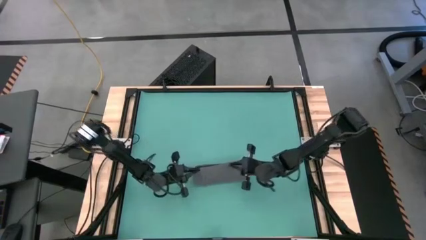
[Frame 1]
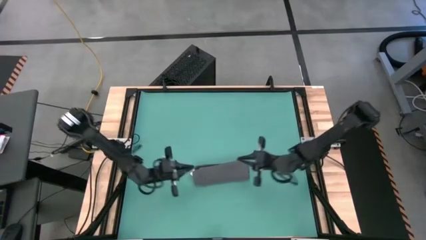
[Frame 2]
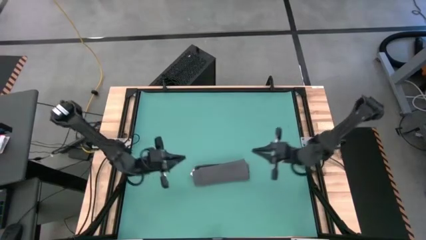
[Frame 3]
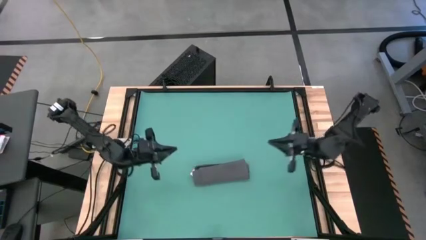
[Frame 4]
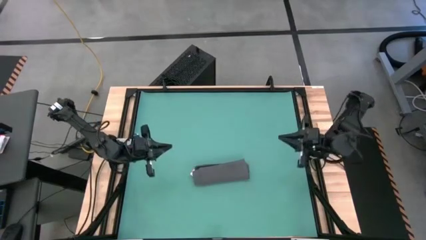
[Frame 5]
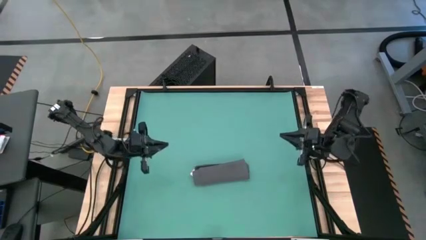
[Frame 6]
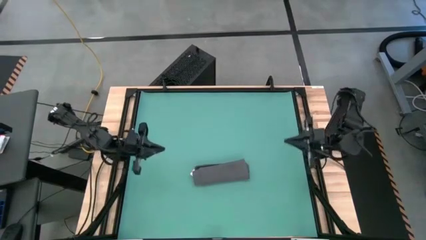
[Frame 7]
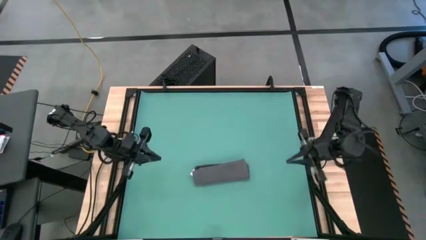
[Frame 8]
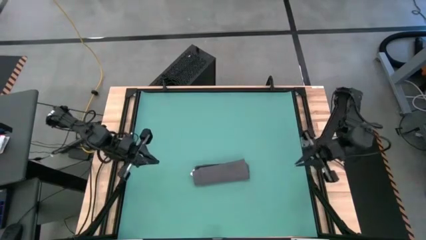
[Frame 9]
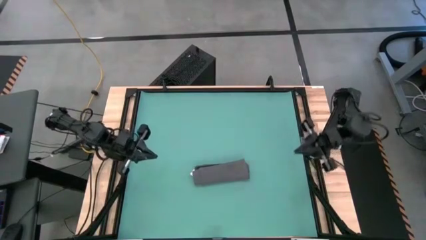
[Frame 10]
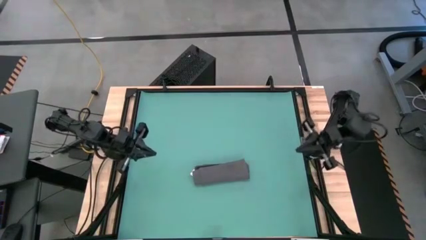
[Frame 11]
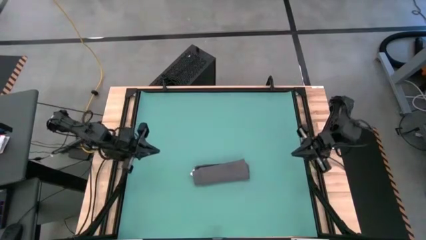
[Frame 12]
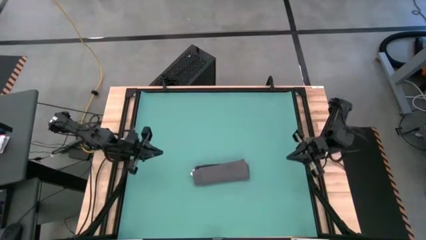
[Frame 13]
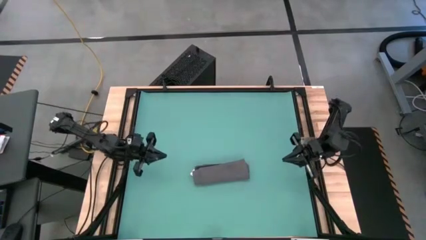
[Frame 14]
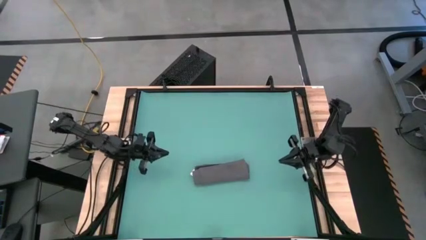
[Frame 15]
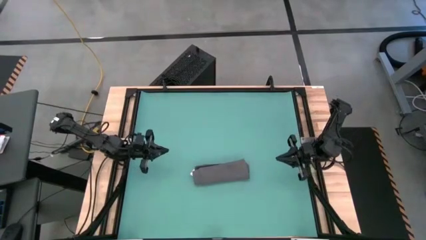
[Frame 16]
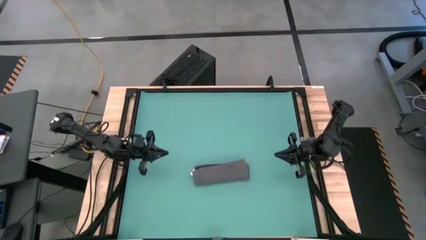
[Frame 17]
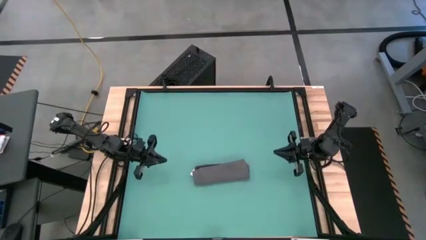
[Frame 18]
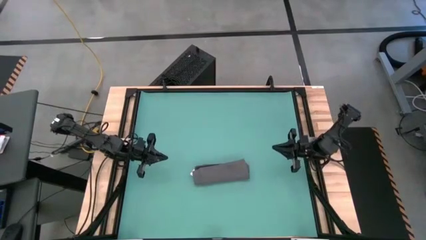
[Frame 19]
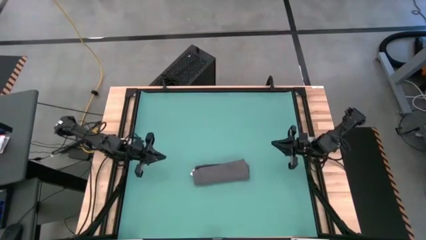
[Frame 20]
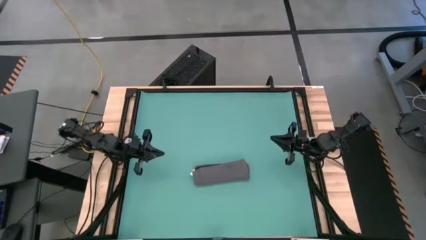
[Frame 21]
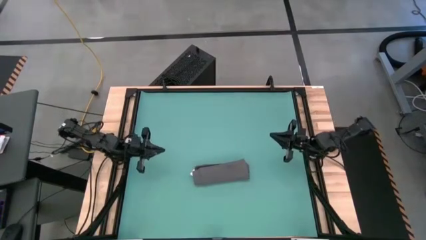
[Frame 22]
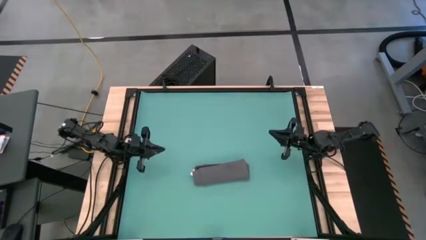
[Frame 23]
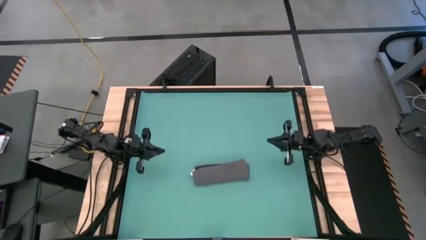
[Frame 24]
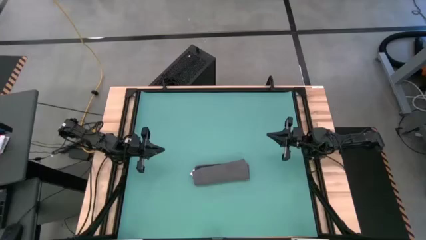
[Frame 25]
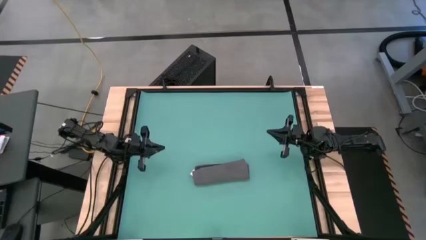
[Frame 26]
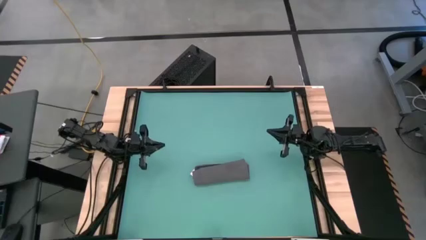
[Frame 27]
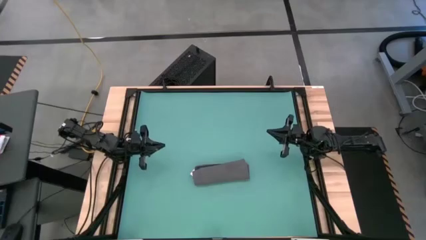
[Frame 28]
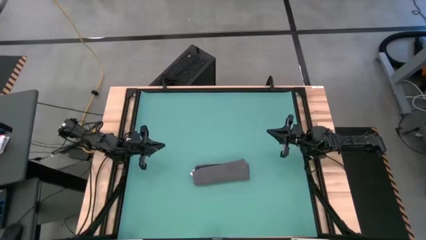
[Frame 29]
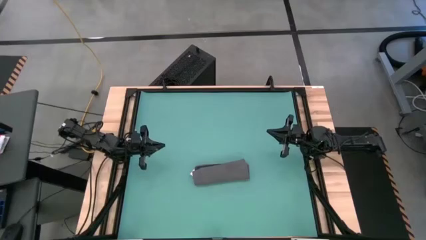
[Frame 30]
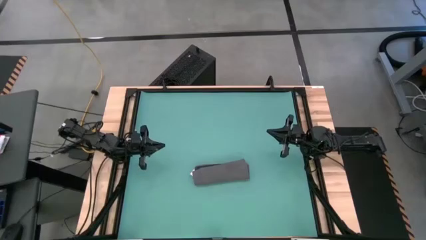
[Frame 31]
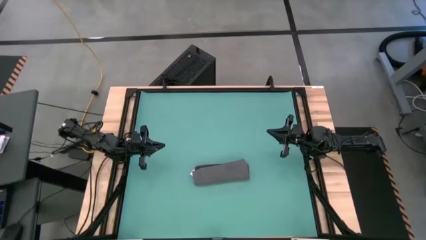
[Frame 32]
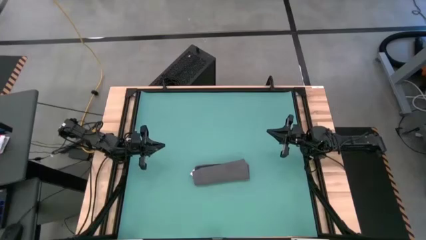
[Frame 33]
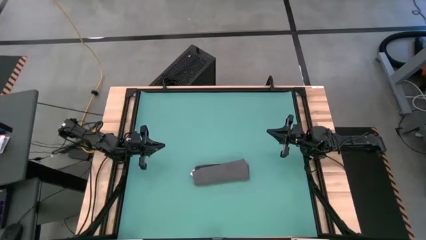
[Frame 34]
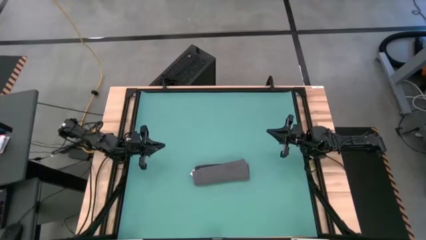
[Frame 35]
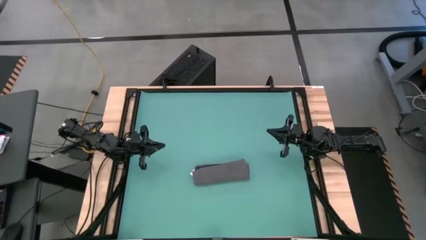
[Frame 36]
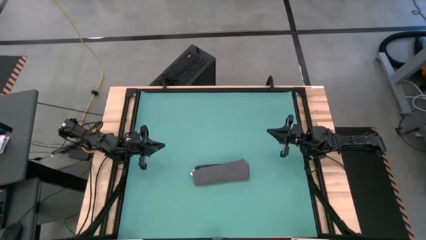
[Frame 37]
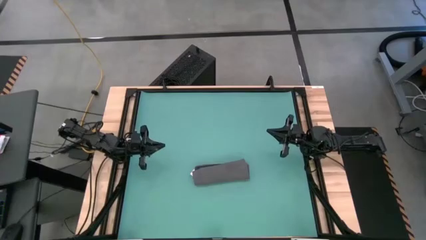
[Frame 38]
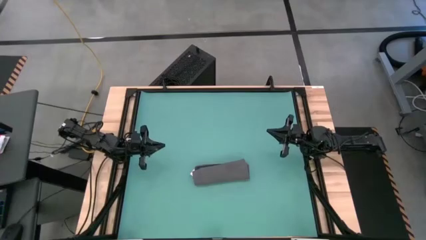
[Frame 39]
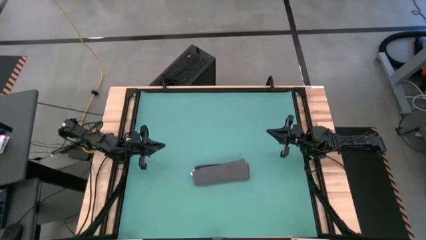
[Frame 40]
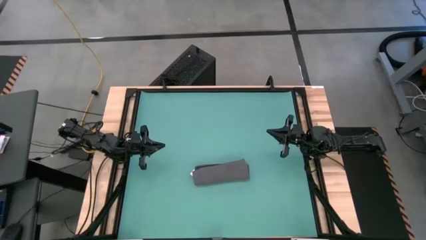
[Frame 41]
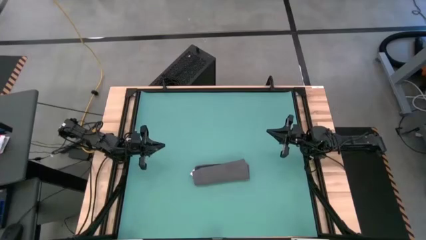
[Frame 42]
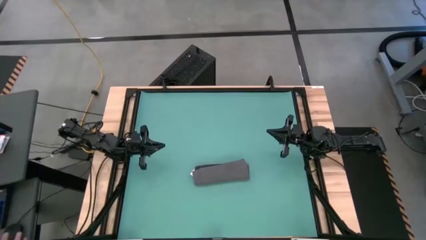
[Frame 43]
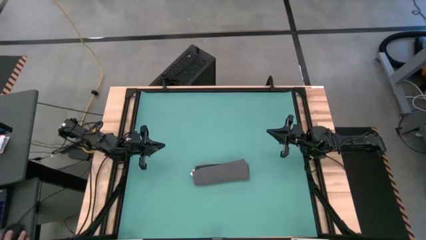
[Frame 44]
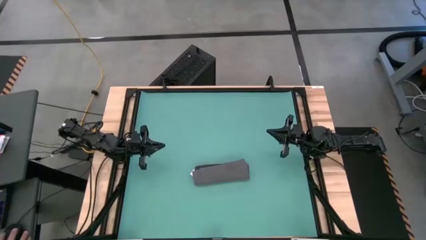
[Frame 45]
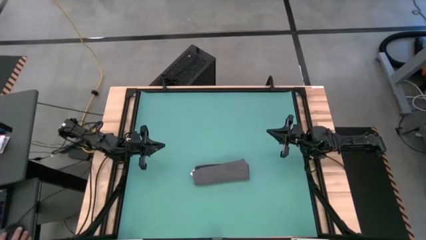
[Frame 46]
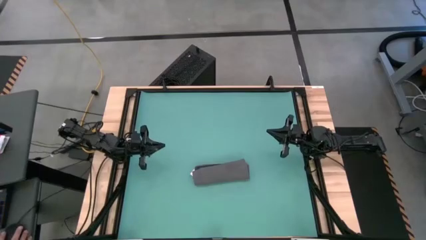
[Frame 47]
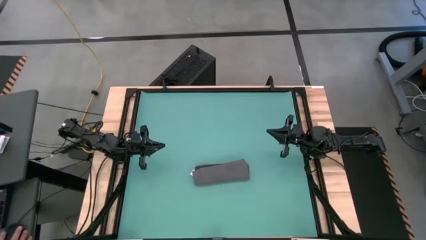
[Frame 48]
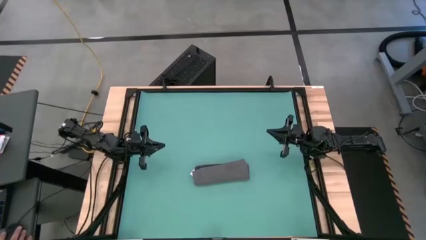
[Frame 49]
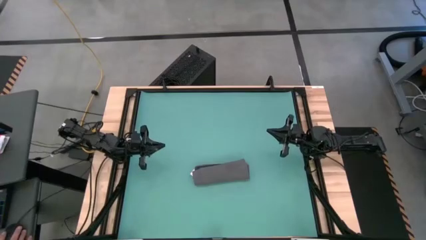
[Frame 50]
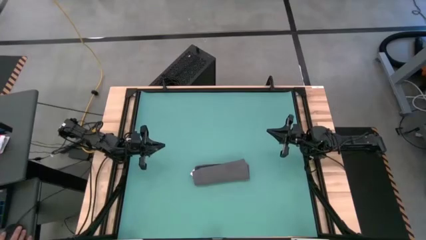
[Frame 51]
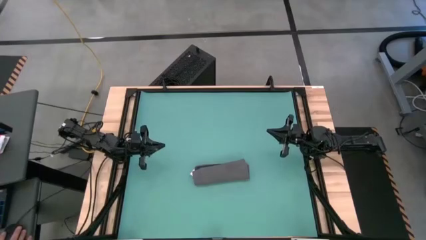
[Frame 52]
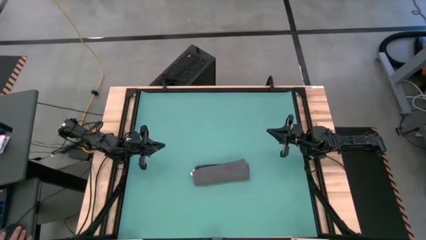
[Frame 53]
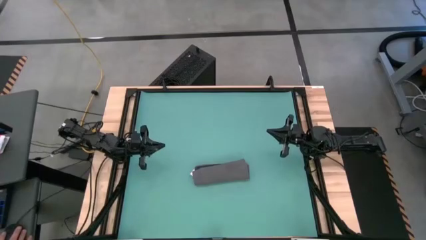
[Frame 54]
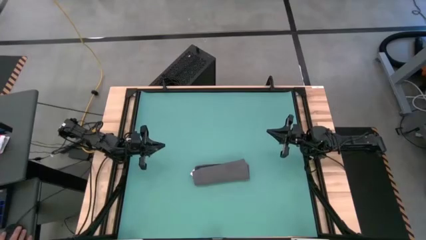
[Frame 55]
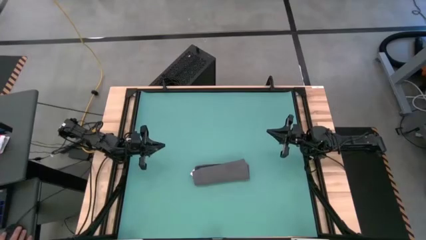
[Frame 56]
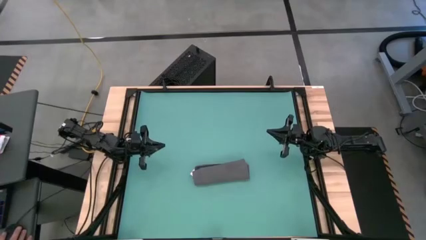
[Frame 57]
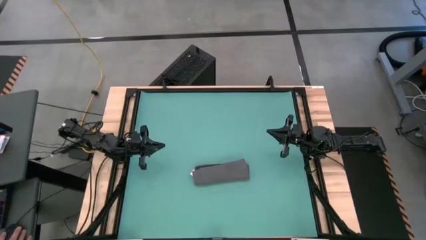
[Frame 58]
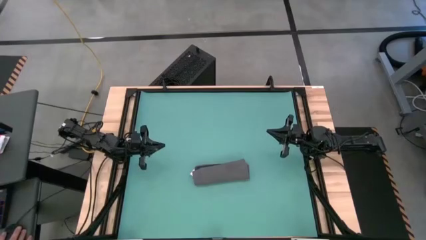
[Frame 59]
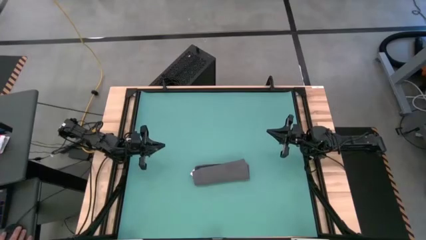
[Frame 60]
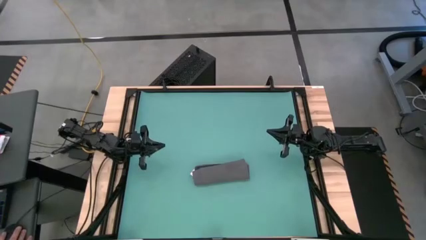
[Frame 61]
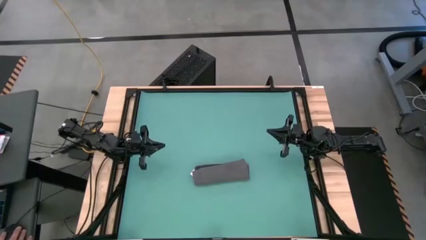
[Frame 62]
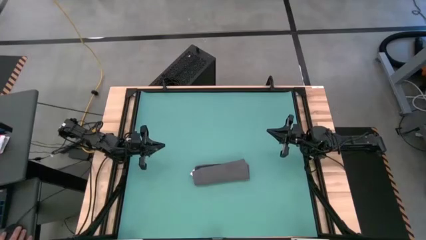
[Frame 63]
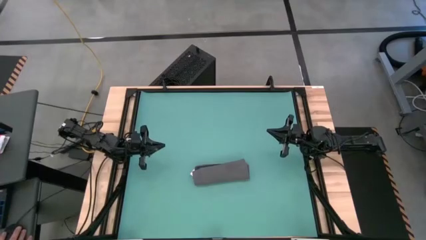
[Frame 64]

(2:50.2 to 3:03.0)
Task: Roll towel
Return to Home Position

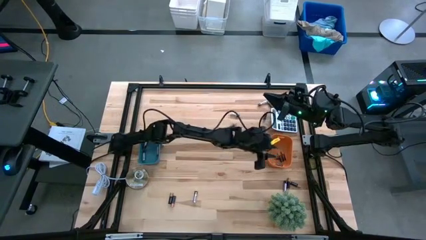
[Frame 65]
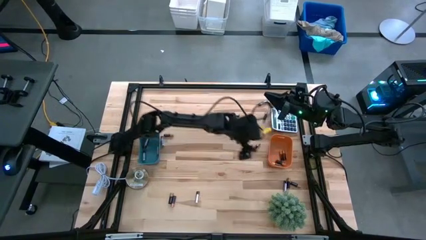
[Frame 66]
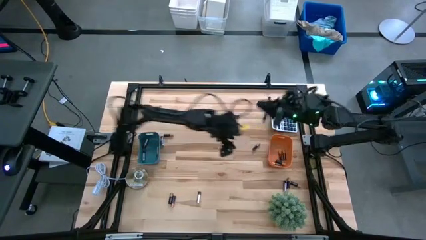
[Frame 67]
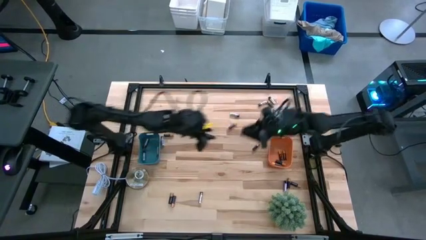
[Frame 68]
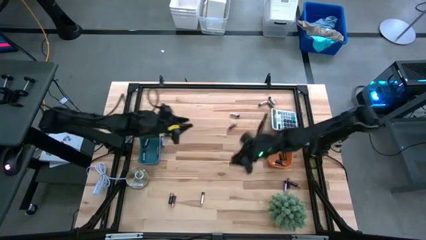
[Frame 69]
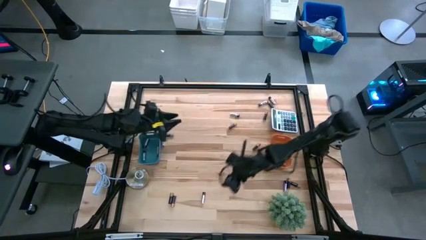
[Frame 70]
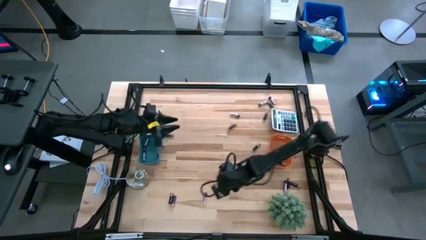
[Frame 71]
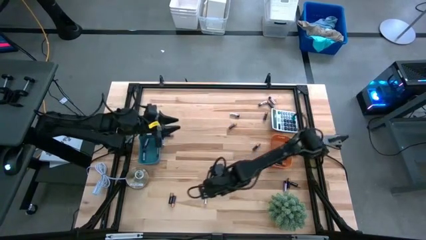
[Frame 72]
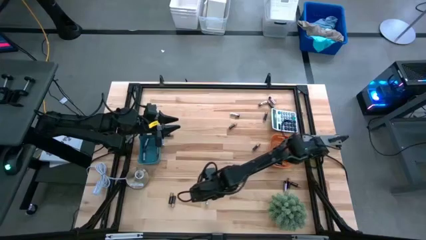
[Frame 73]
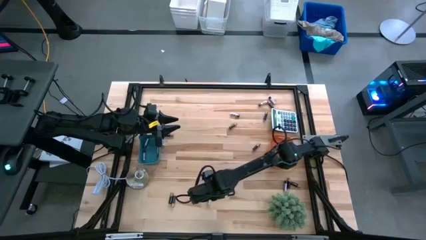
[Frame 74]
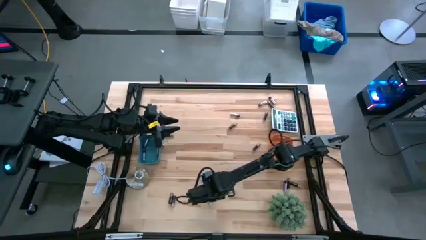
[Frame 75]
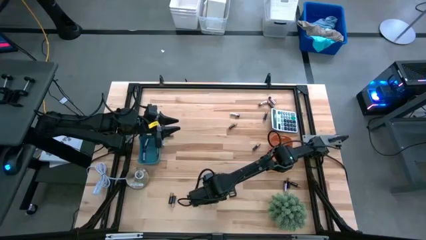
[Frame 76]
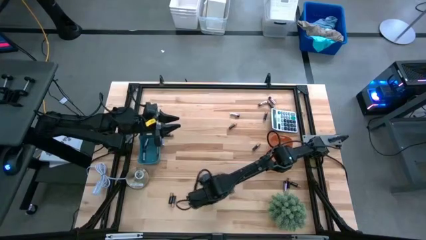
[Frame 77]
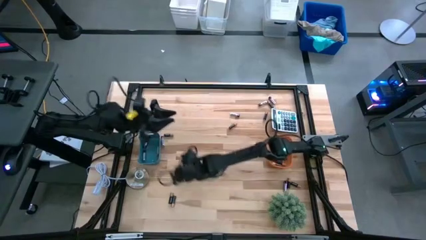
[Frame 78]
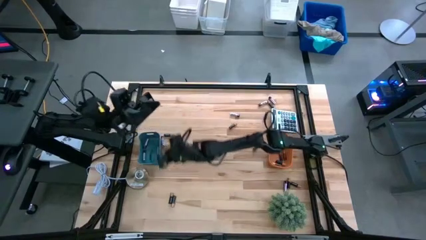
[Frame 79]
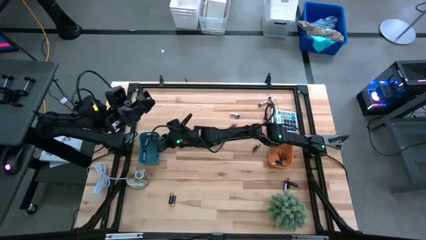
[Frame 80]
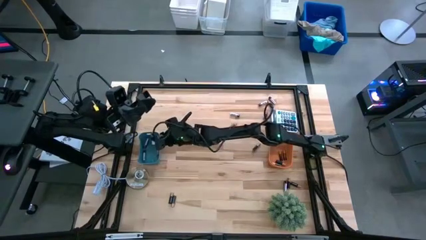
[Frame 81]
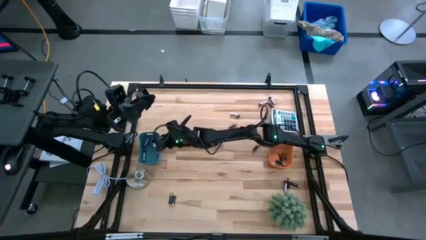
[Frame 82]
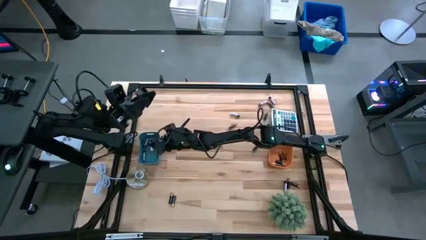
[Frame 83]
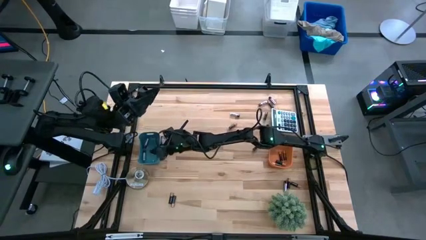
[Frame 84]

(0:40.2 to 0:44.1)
Task: Sort batteries
Put the silver battery into the blue bin
